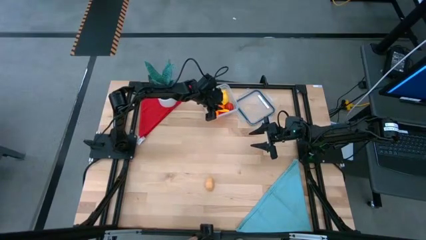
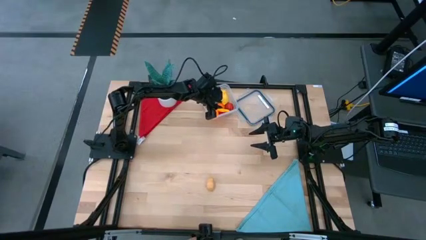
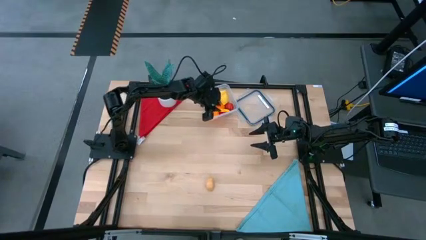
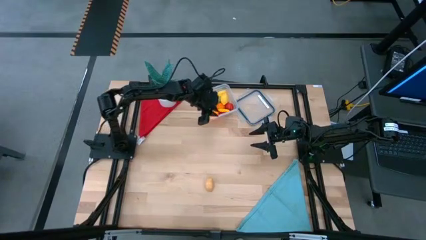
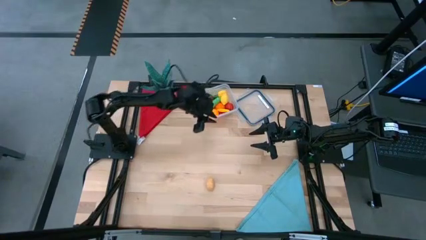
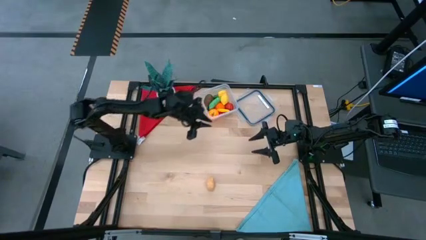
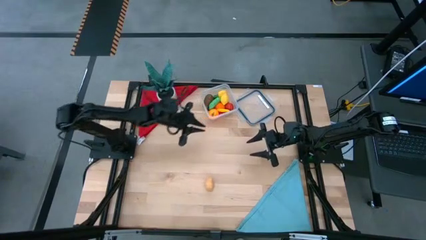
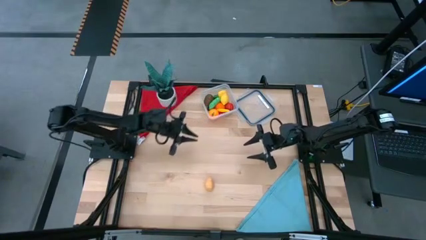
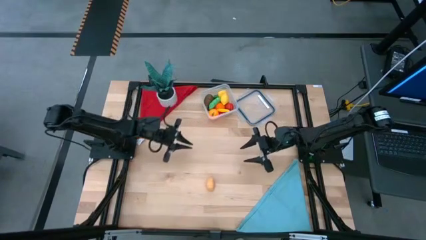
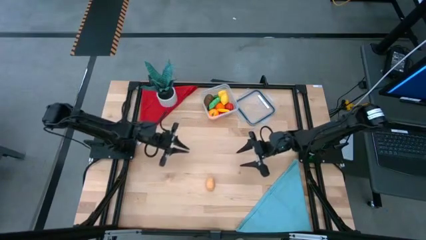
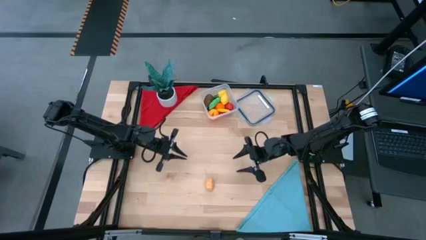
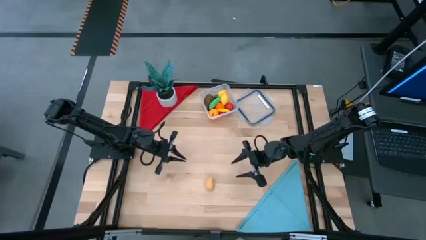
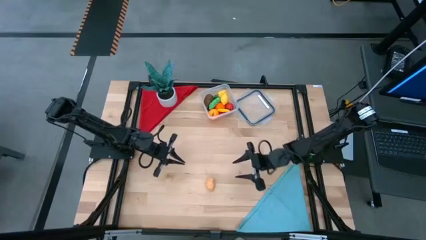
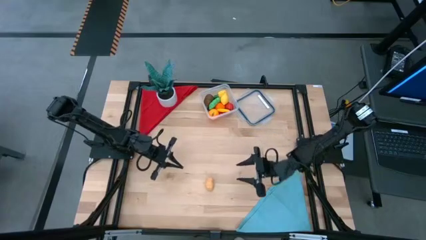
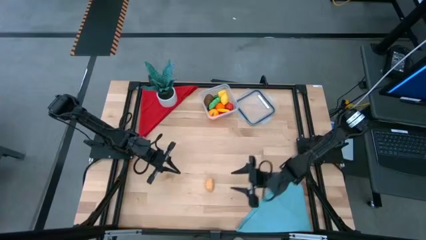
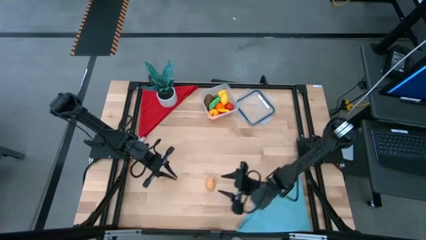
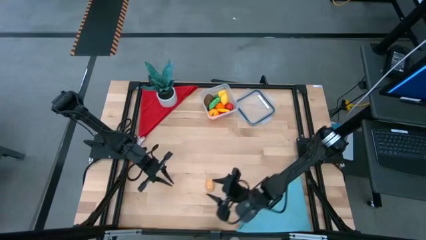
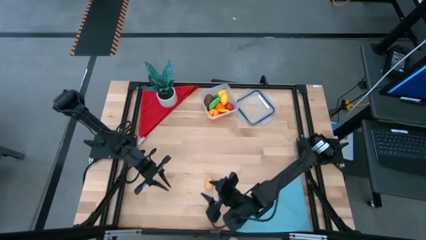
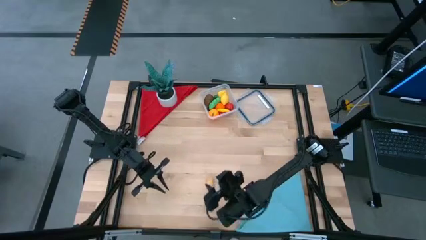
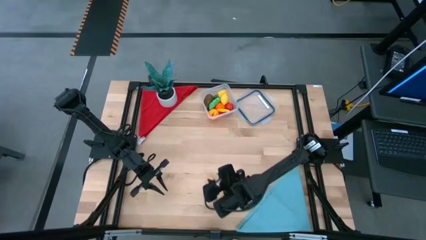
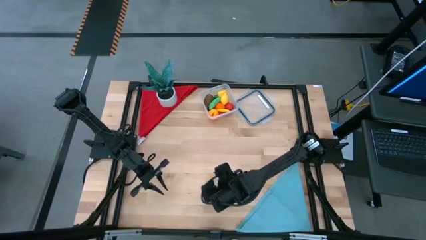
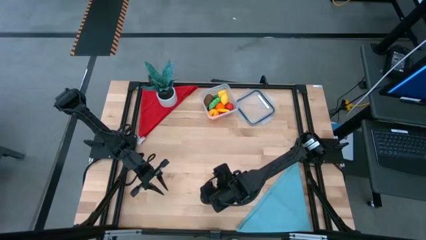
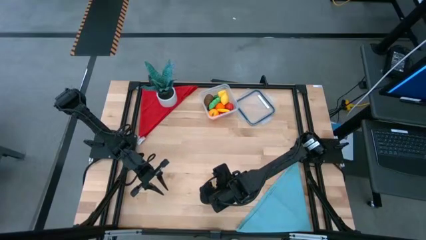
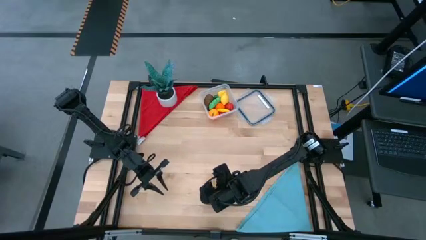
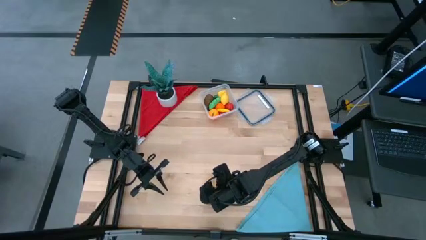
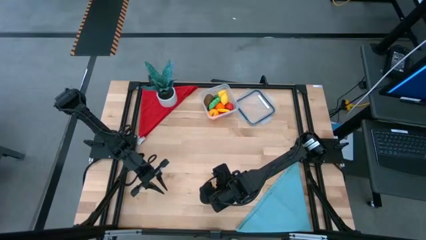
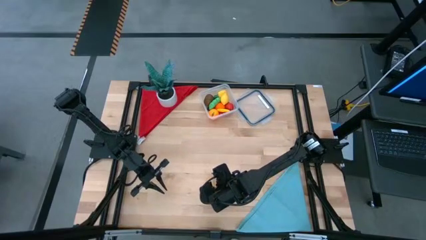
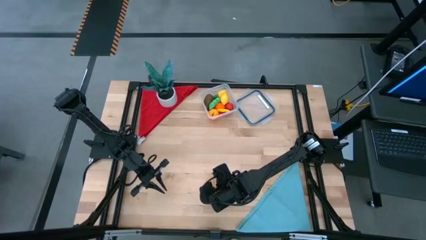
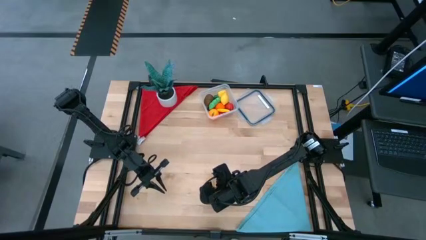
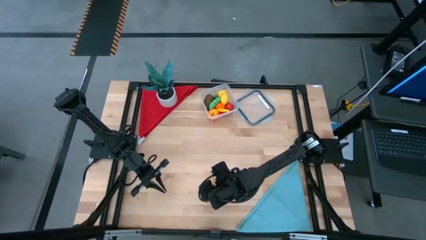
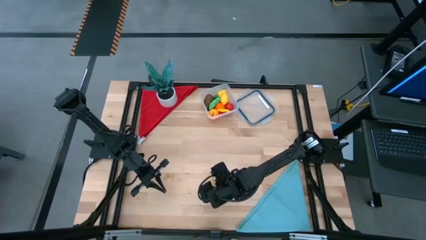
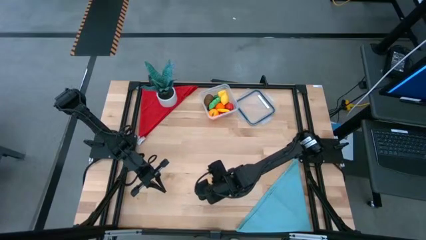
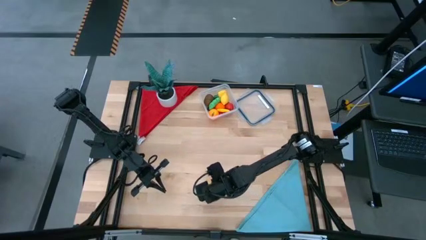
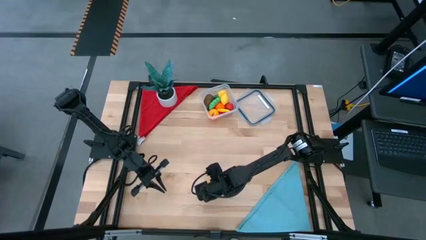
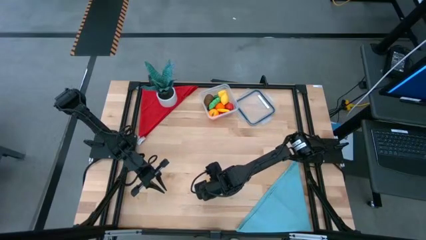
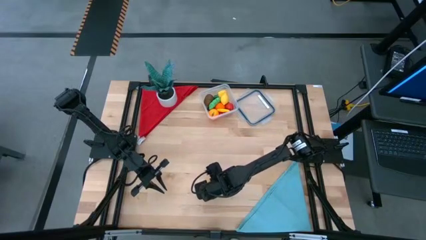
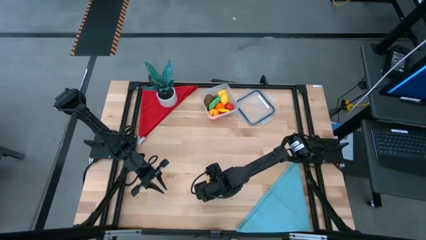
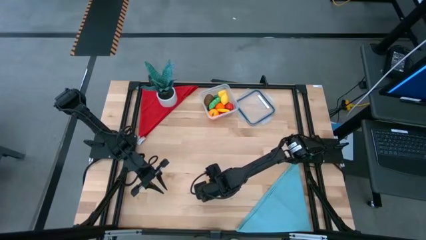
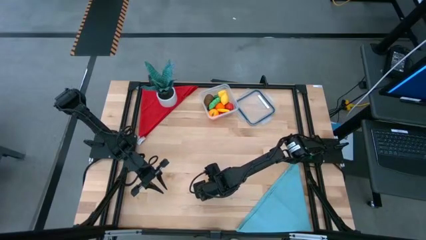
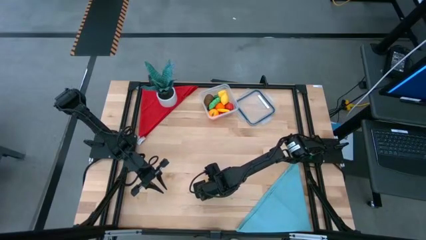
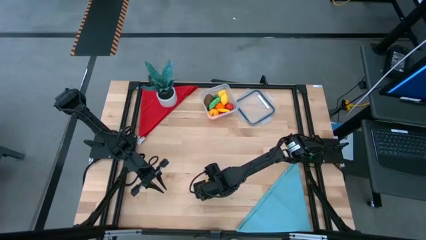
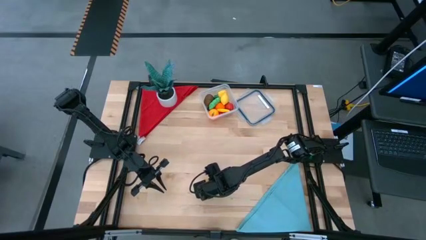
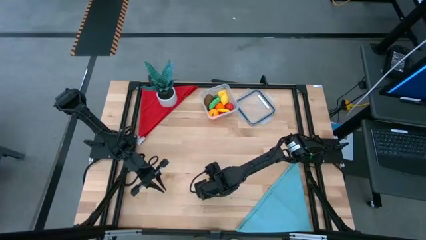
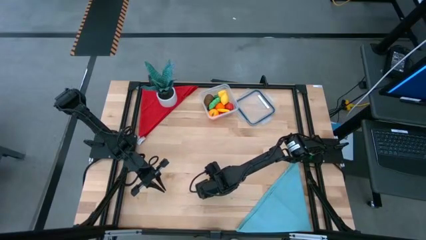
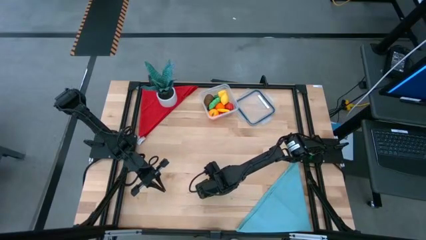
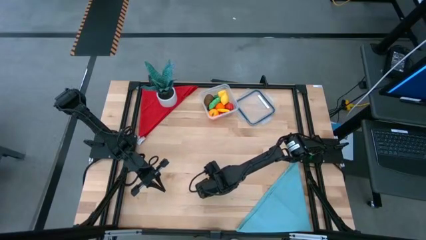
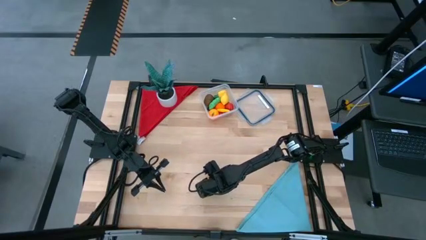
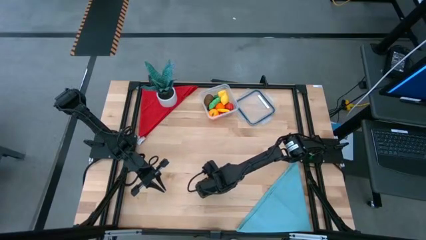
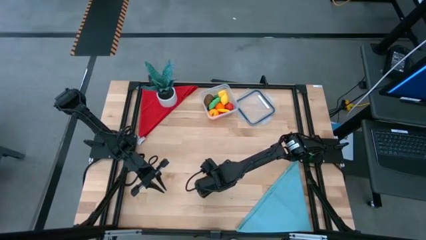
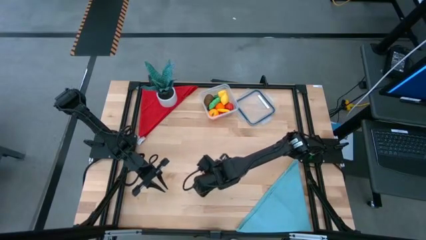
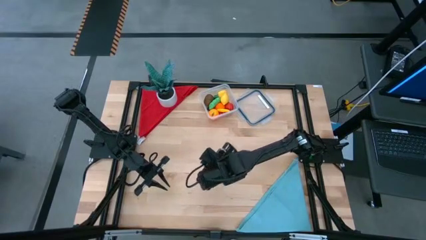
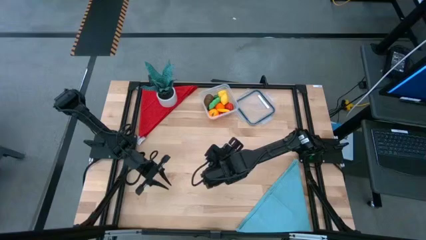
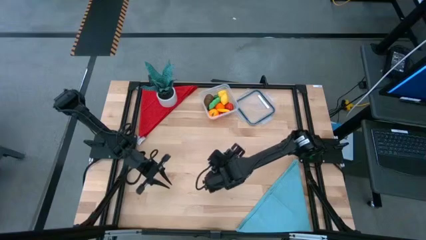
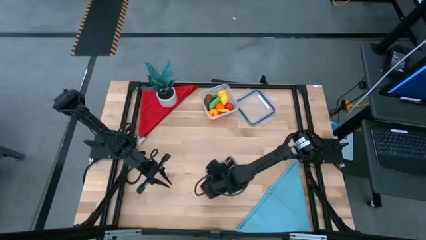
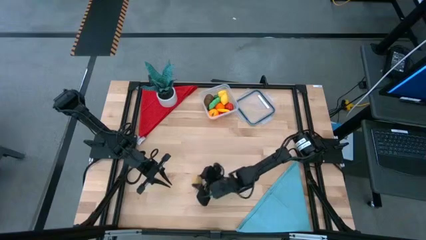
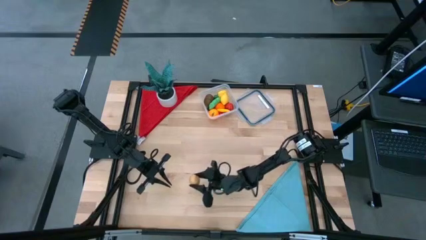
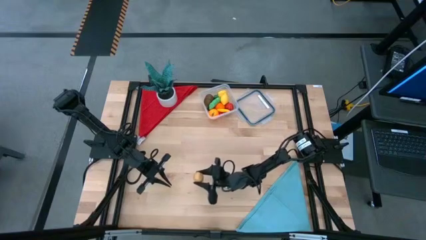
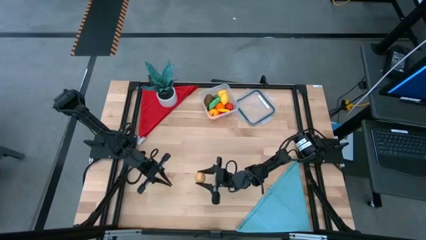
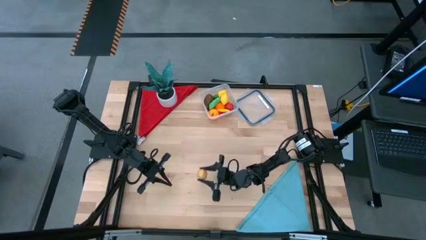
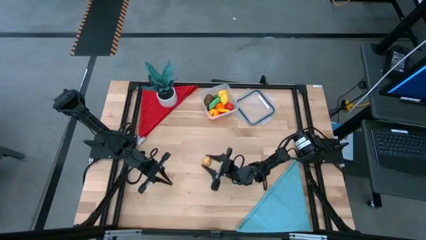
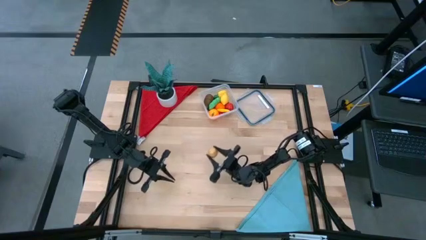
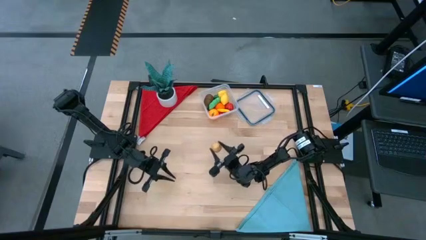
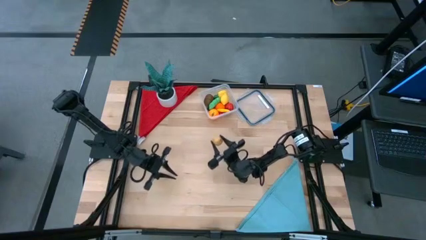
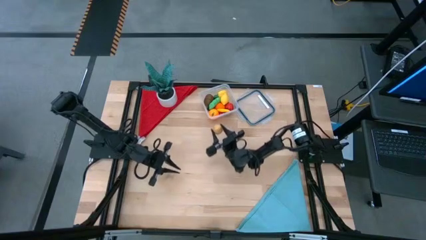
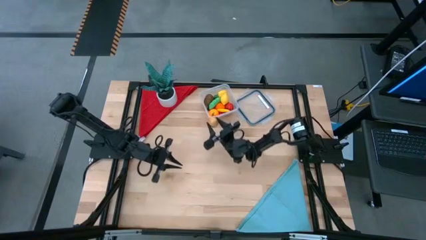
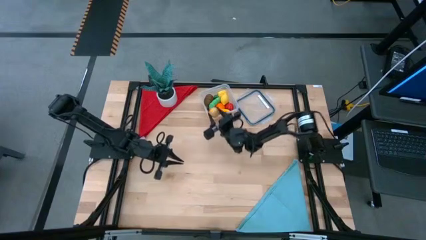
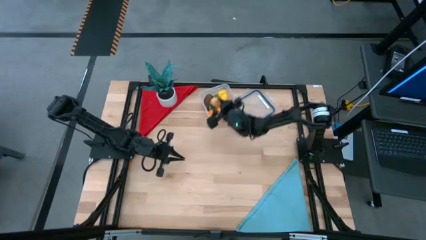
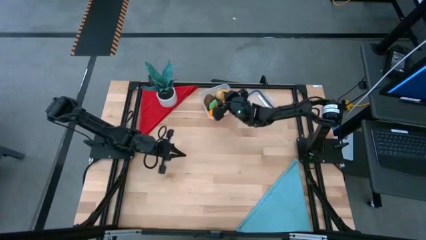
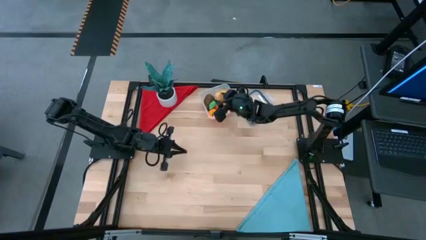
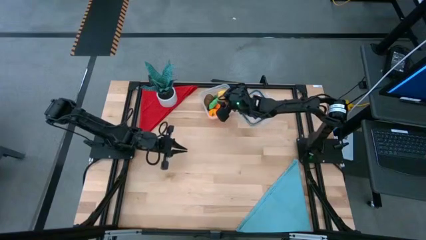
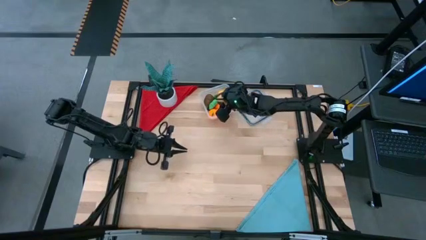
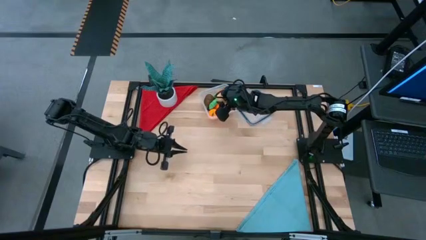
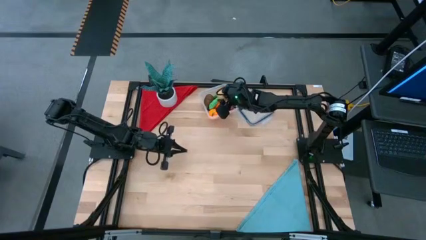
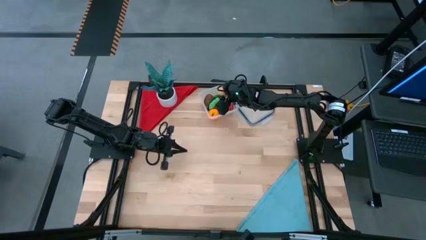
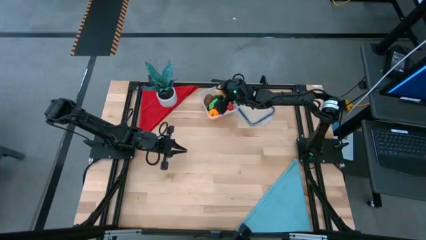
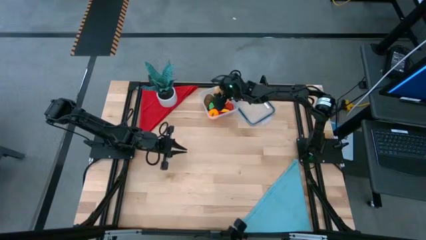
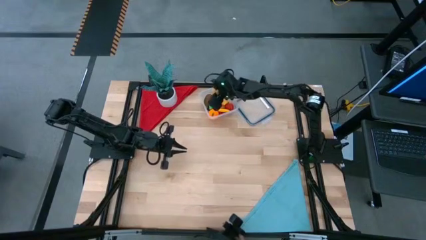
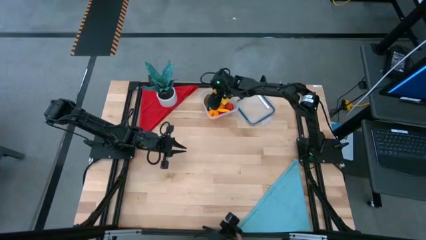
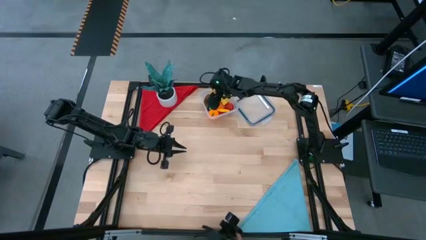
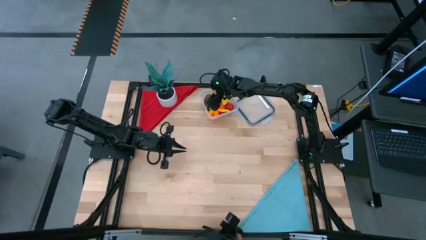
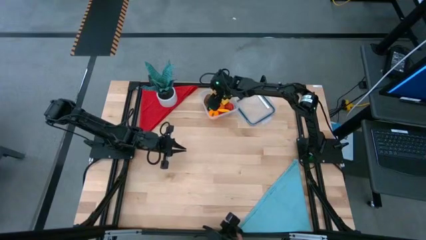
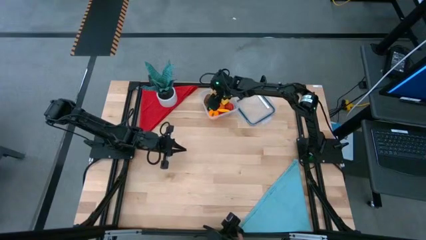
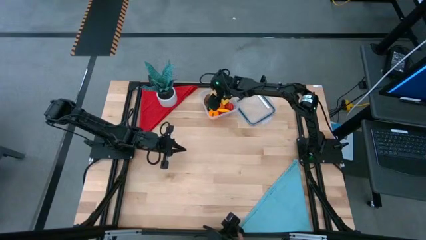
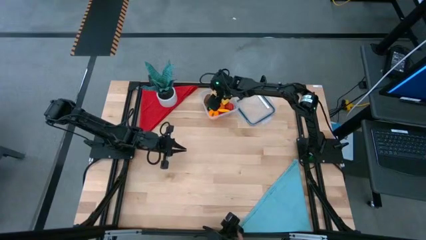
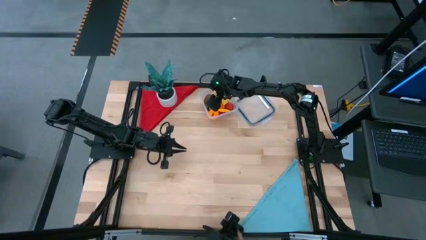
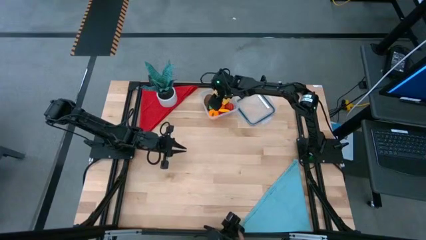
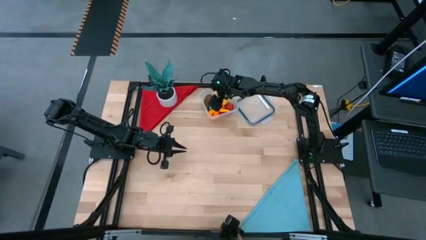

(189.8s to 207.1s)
Task: Pick and placing Produce into tupperware
Put the brown potato into the transparent container
